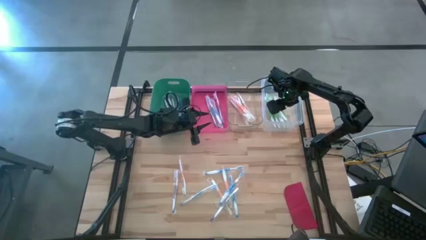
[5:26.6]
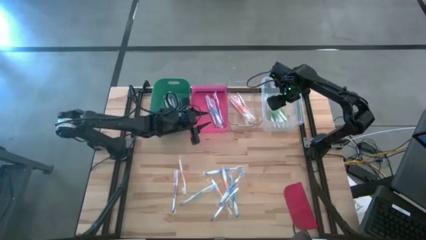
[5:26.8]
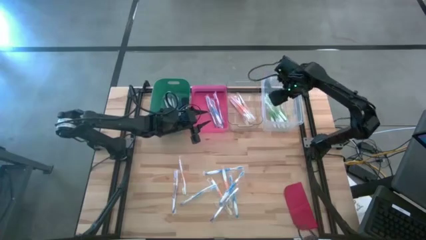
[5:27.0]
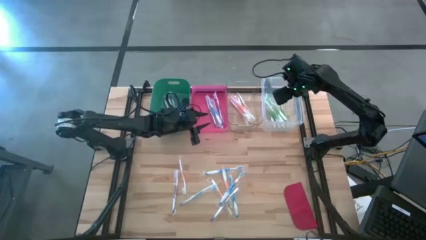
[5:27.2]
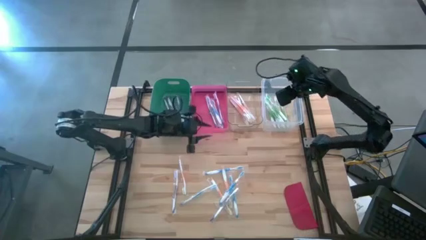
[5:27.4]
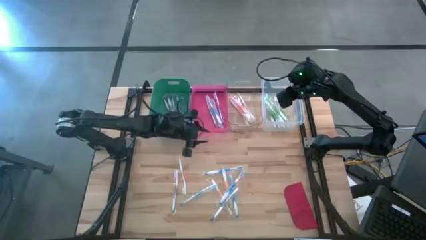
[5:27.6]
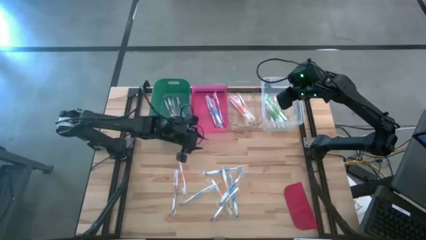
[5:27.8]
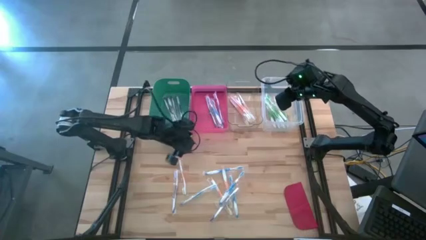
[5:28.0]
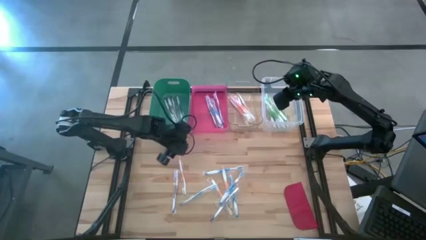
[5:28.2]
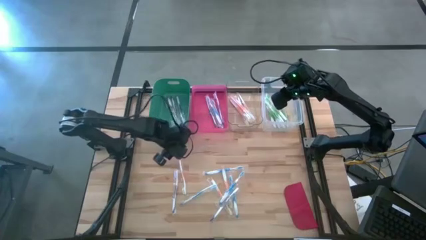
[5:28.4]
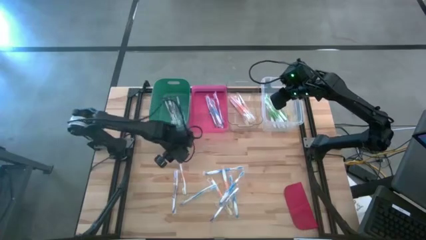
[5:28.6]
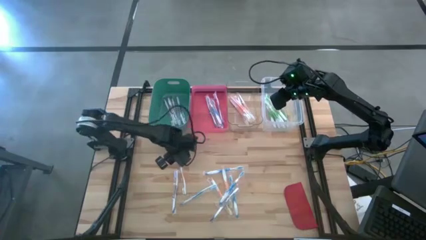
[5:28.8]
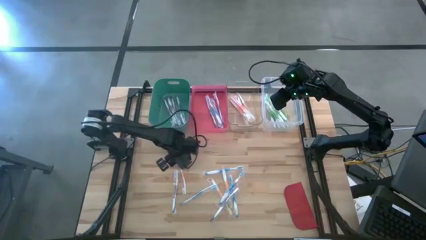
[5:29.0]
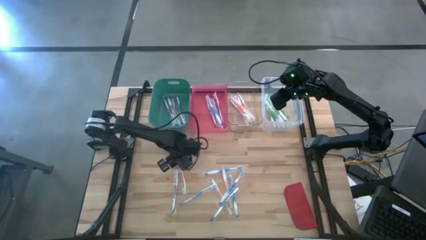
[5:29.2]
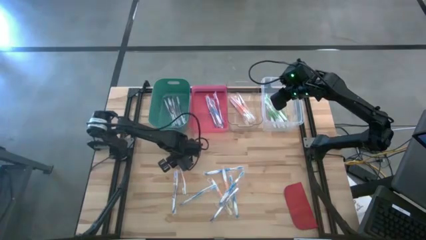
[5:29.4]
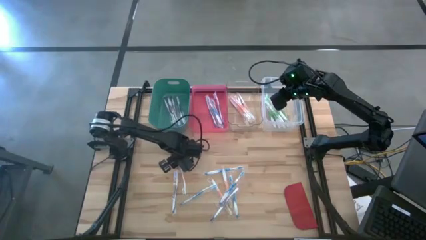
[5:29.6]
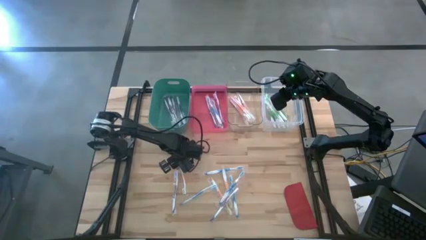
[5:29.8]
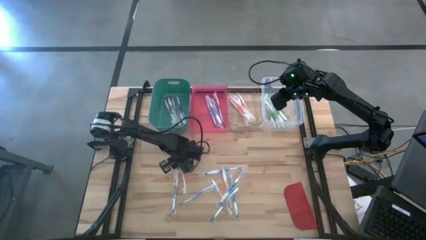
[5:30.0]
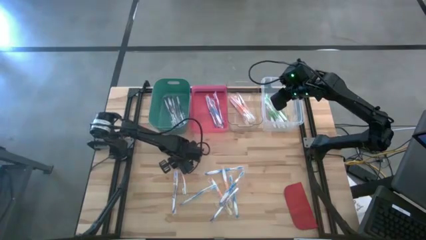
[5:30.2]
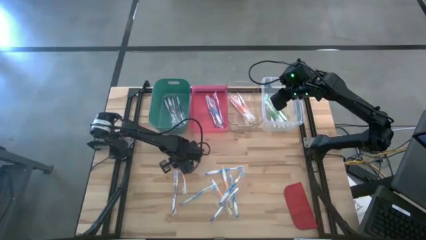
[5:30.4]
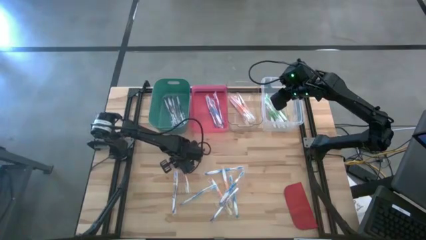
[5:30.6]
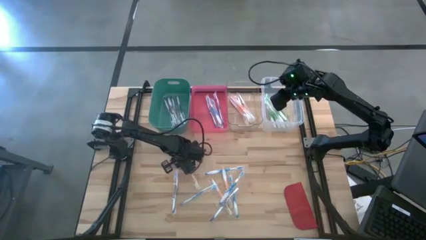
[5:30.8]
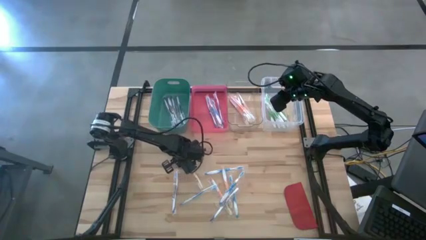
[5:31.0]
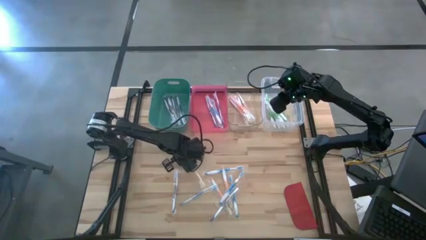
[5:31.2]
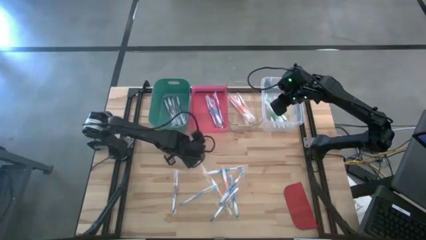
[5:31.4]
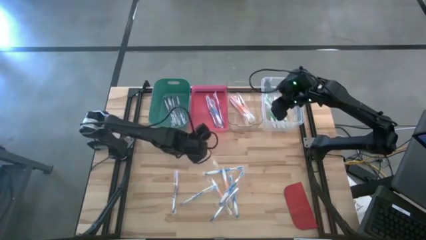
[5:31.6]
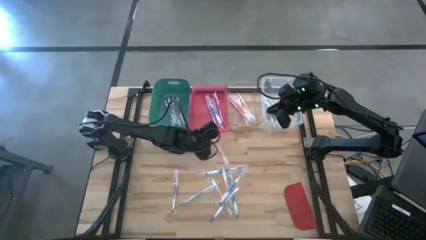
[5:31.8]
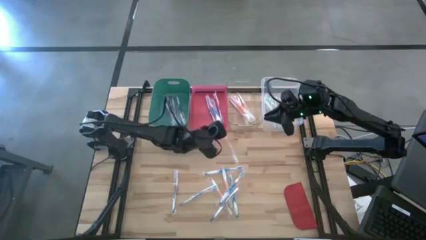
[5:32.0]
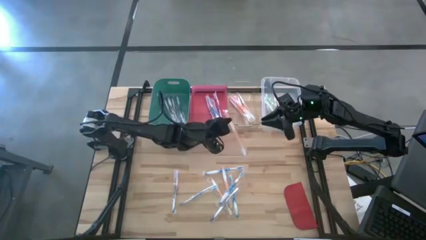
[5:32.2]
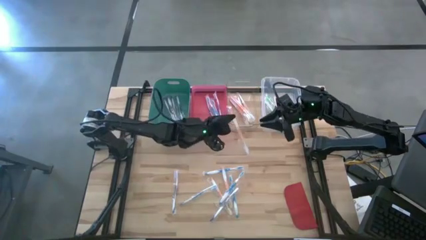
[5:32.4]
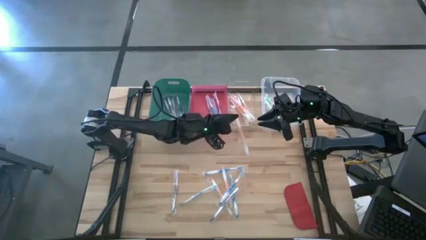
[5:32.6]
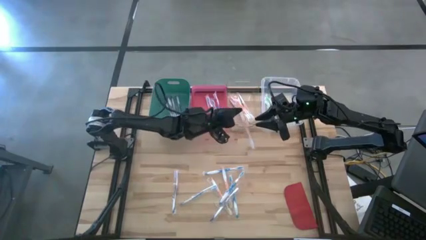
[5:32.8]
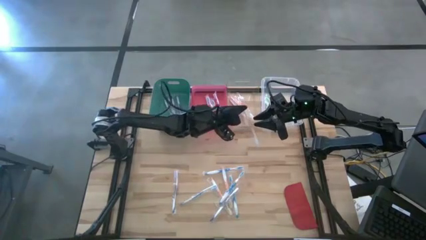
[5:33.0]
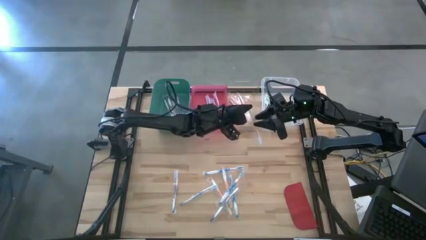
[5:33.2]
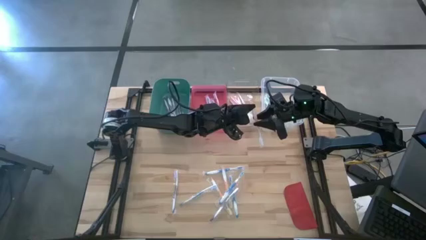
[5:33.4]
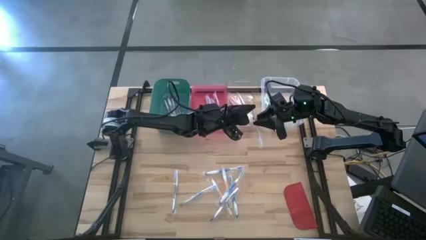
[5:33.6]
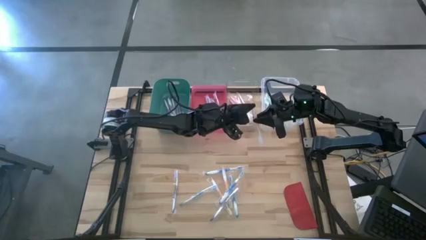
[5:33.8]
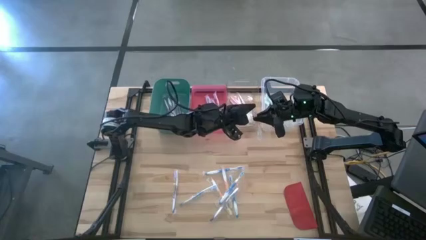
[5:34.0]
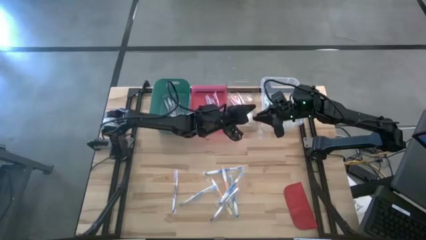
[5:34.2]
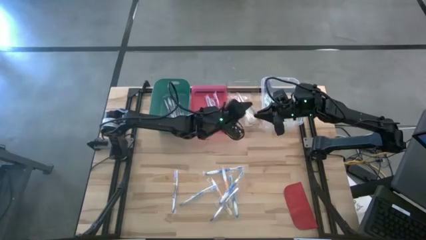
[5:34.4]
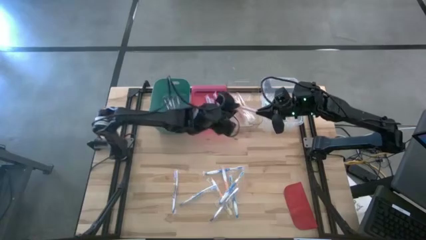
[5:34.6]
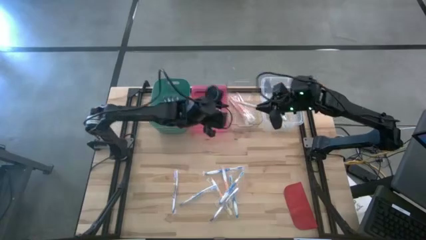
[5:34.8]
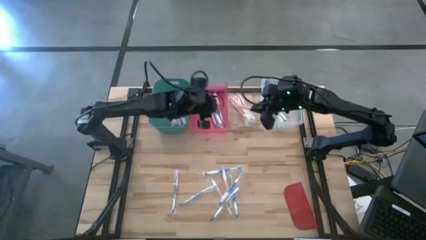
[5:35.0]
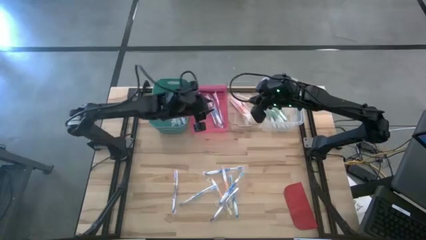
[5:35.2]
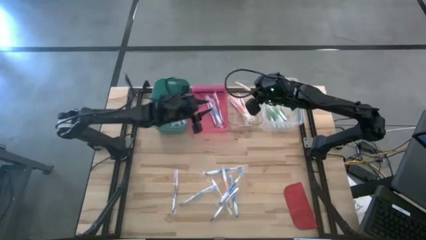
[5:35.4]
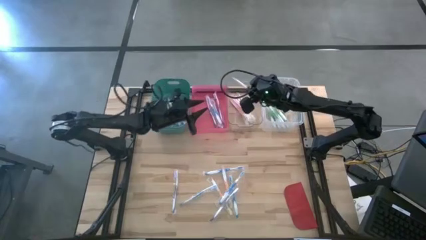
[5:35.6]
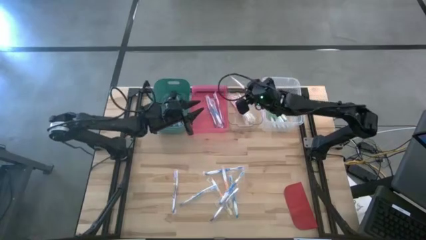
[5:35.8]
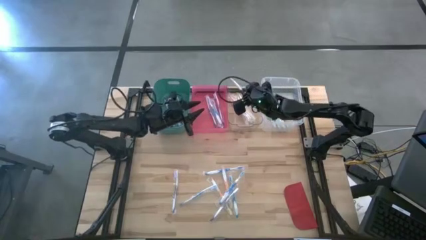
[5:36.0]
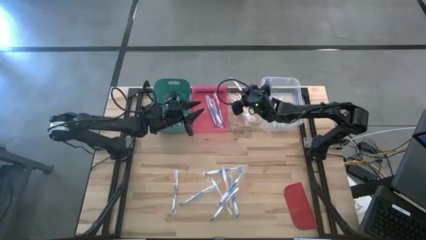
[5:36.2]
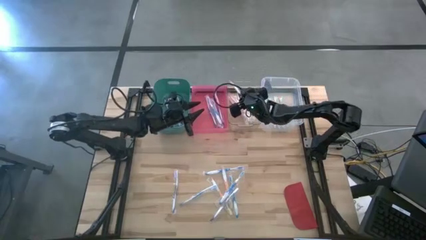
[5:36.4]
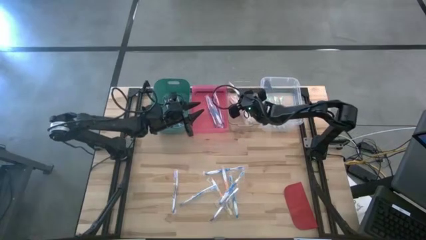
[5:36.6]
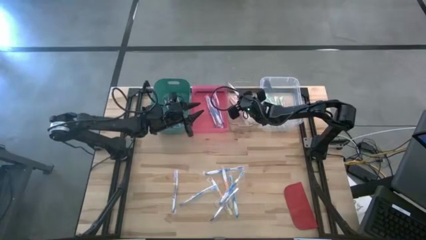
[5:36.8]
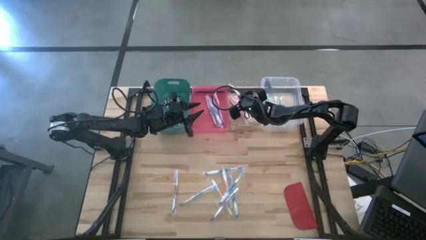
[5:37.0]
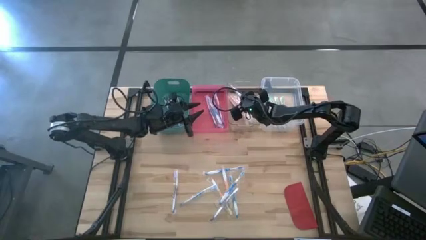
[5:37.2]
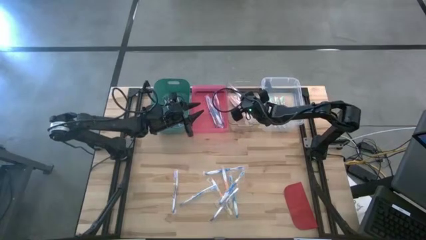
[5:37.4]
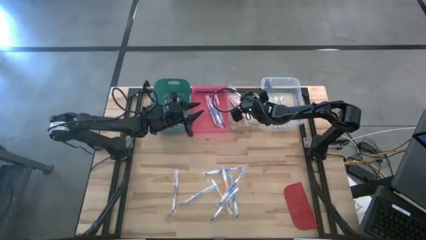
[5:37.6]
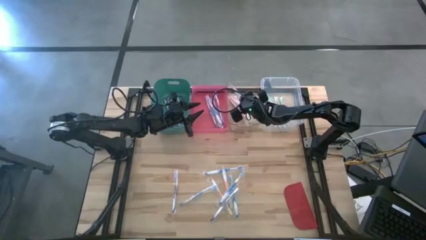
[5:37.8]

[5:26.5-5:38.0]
Task: Pick & Place Toothbrushes
Put the orange toothbrush into the transparent bin

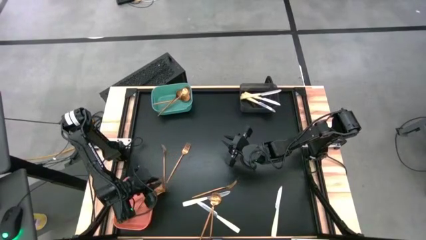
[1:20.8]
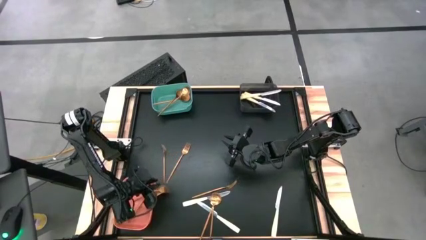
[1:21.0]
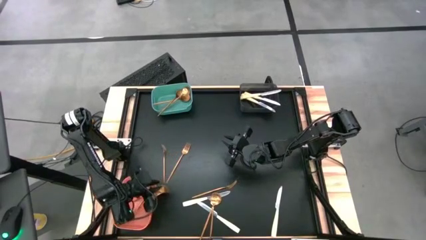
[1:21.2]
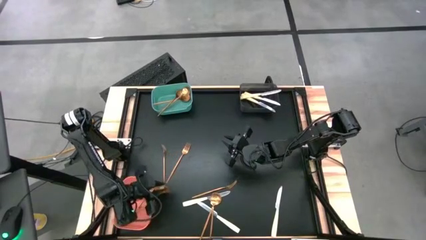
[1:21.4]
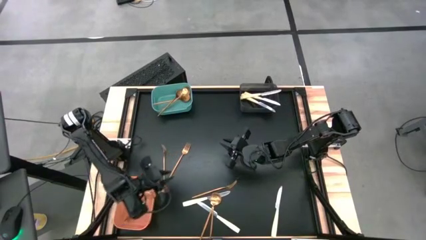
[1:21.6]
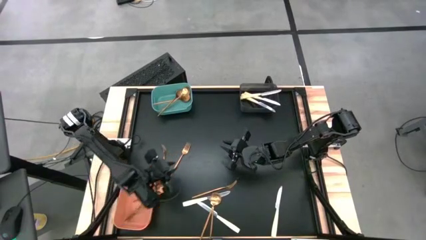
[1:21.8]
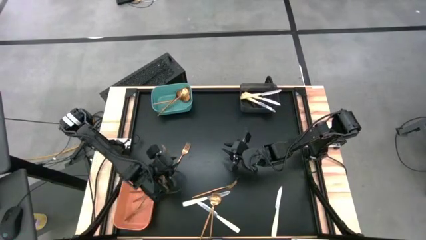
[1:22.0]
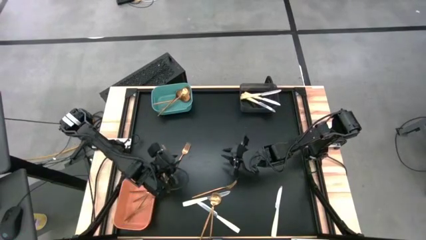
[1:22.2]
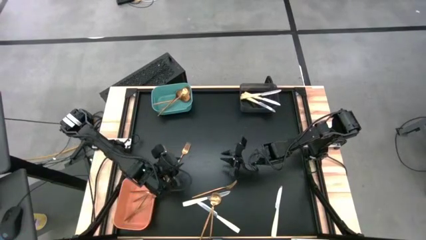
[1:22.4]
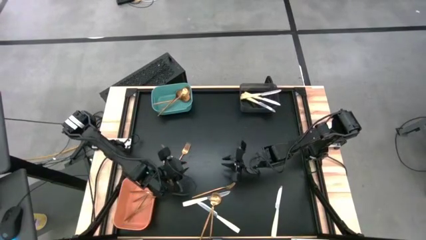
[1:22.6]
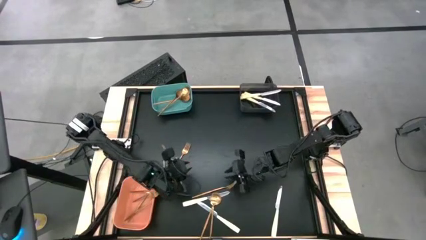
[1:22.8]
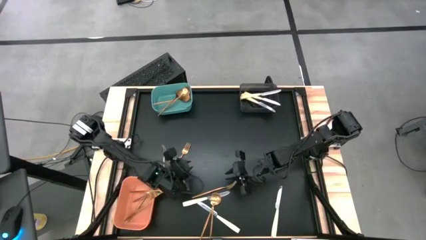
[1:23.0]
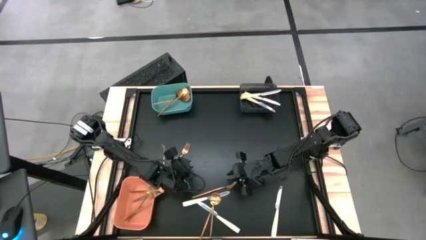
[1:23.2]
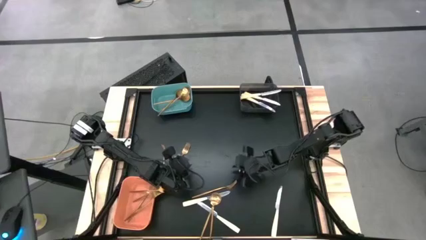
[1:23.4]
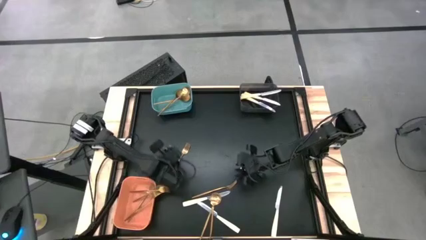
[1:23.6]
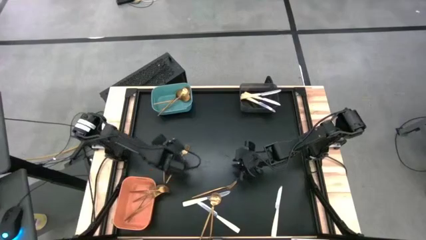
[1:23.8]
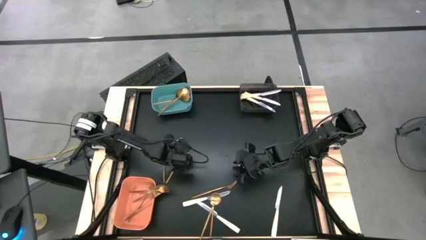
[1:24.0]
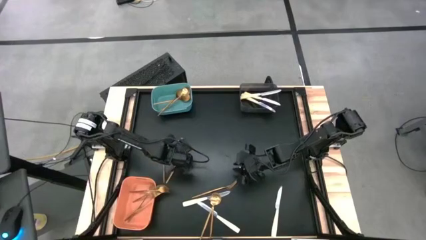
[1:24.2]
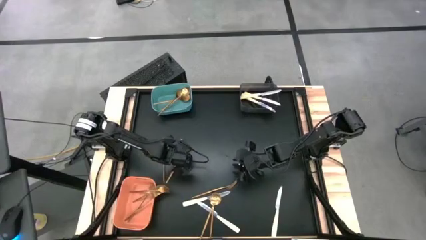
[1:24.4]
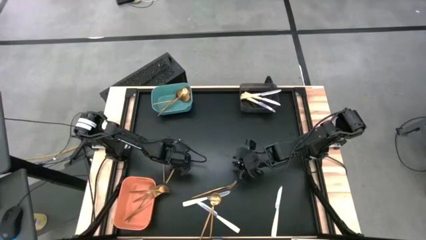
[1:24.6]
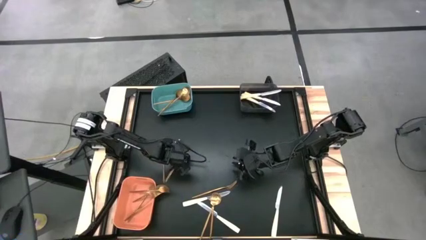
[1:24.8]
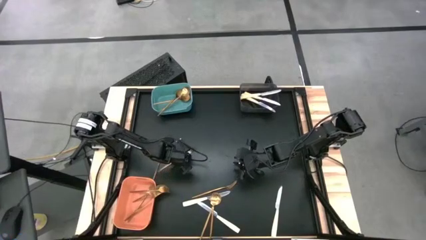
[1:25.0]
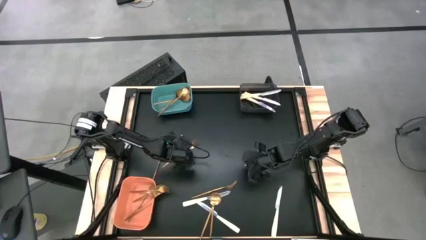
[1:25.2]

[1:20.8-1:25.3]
Task: Sort silverware by color (type)
Put the gold fork into the orange bin

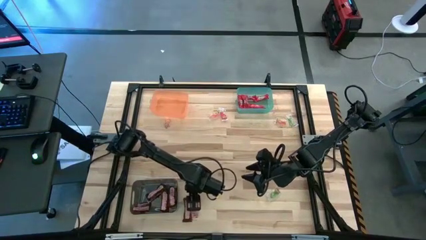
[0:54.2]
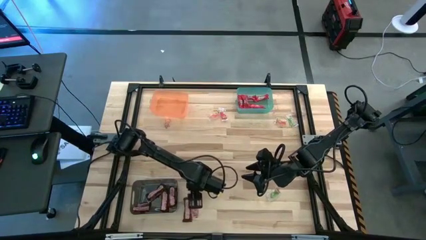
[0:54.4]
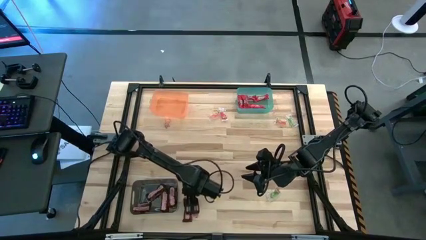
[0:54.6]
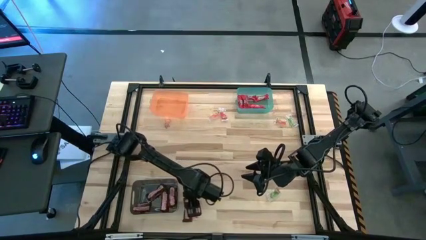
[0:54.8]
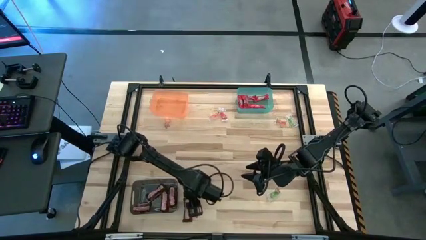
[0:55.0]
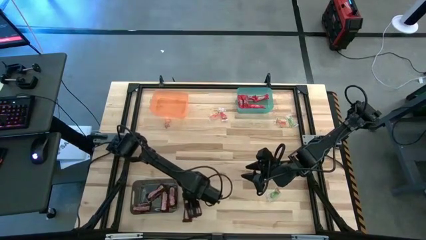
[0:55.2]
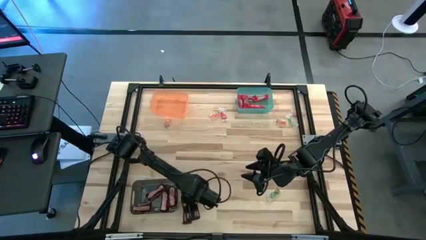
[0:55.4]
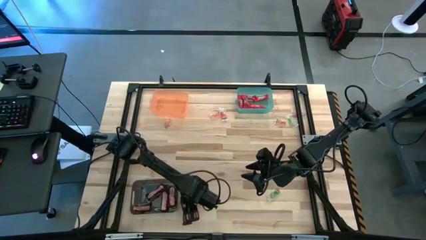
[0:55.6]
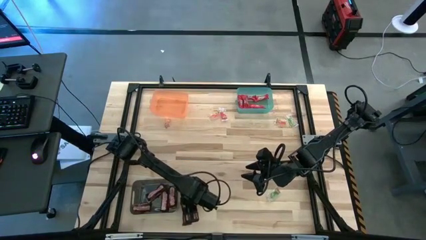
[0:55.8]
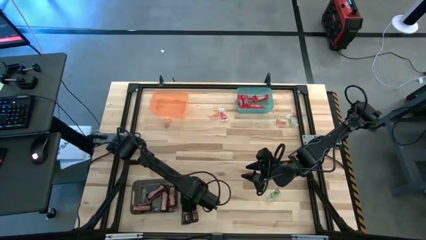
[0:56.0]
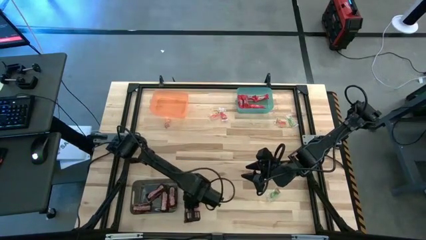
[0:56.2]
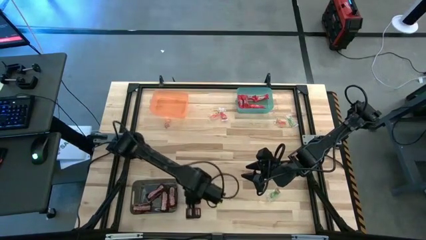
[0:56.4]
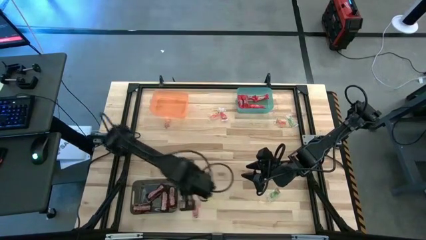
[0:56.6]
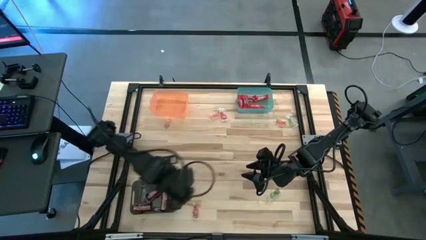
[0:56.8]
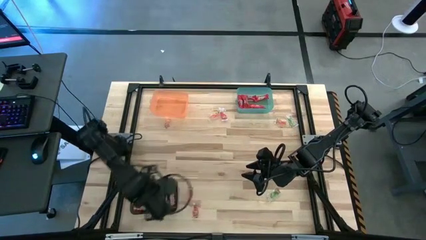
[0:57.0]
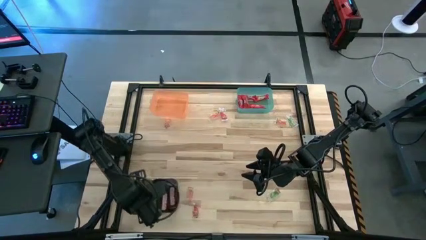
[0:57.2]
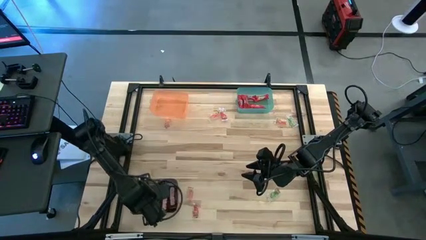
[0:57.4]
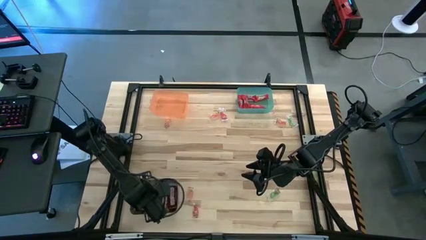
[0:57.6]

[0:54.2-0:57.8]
Task: Sort candy by brand, put in halloween buckets
Put the brown chocolate bar into the black bin
